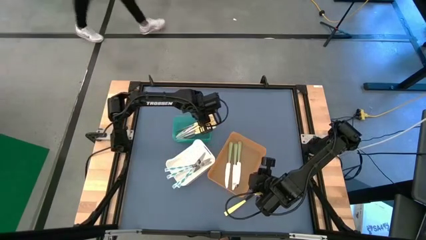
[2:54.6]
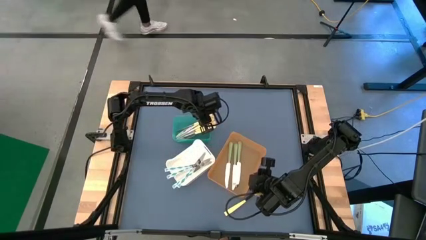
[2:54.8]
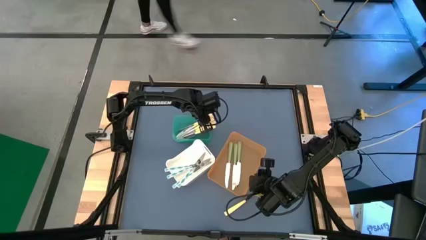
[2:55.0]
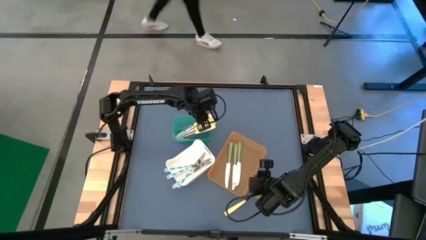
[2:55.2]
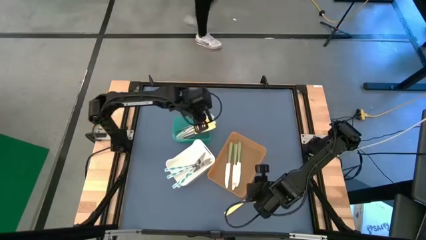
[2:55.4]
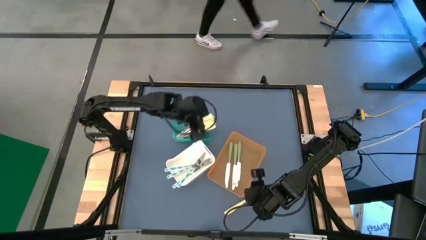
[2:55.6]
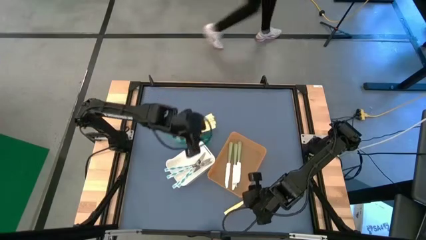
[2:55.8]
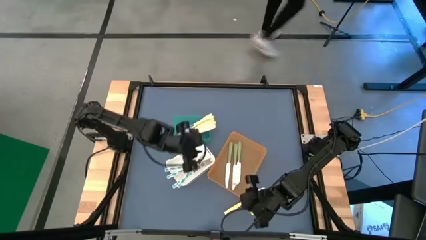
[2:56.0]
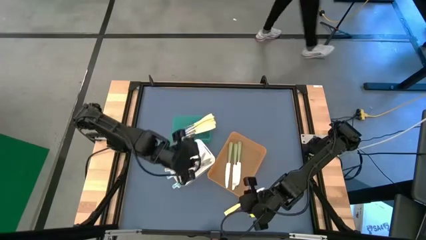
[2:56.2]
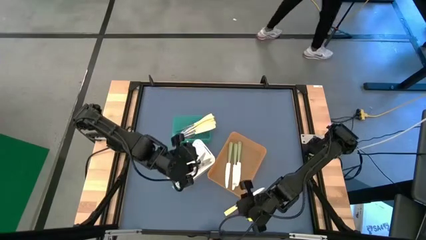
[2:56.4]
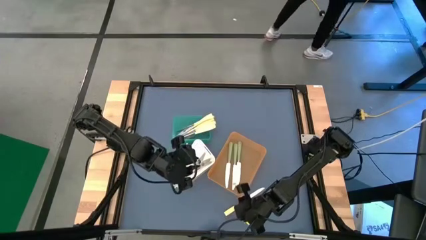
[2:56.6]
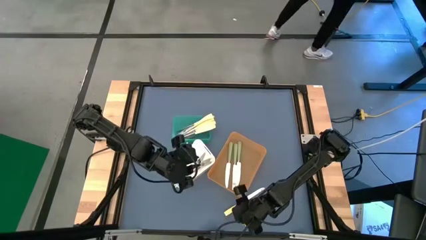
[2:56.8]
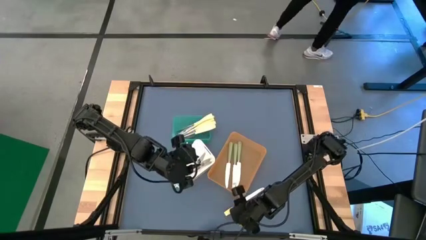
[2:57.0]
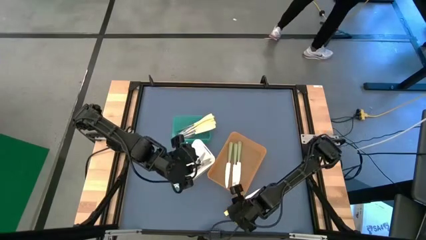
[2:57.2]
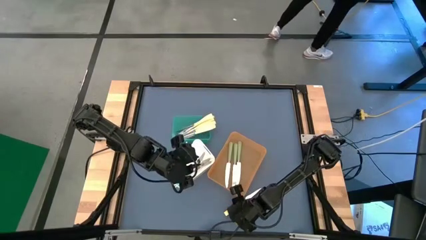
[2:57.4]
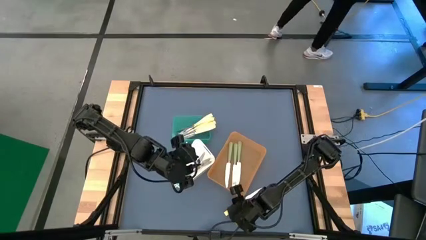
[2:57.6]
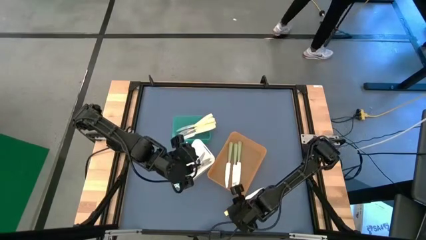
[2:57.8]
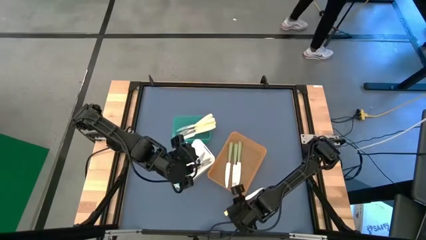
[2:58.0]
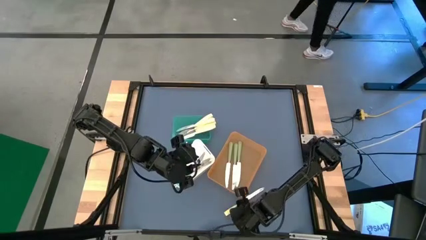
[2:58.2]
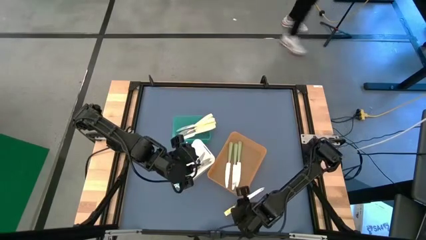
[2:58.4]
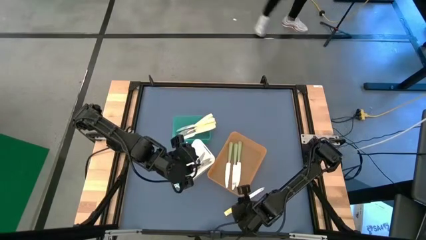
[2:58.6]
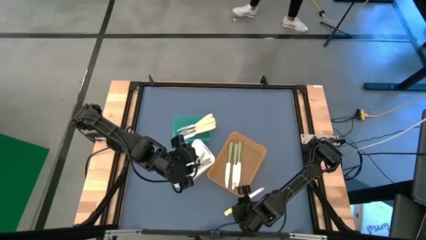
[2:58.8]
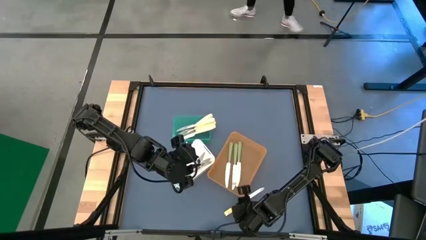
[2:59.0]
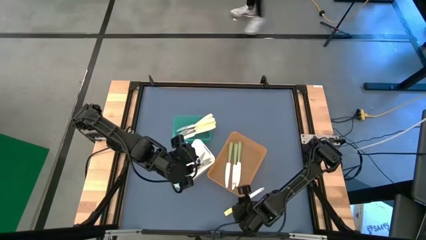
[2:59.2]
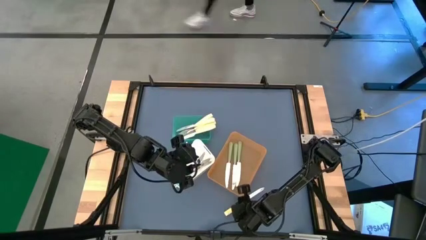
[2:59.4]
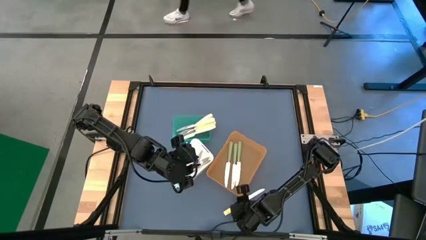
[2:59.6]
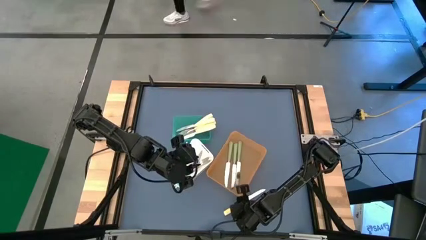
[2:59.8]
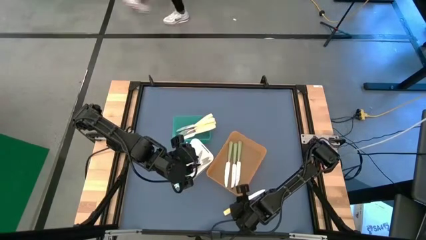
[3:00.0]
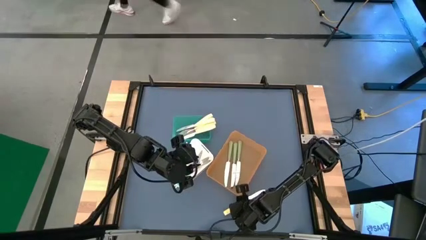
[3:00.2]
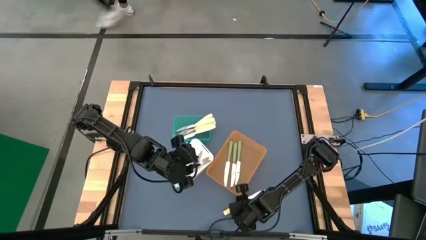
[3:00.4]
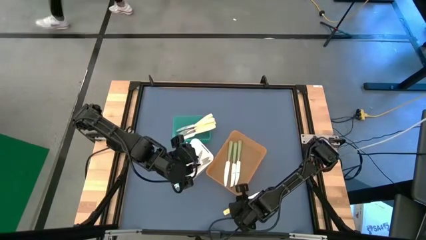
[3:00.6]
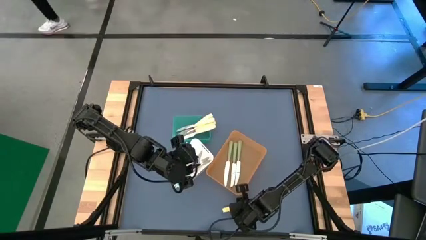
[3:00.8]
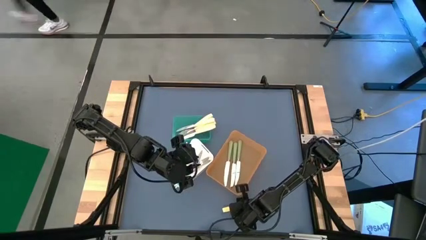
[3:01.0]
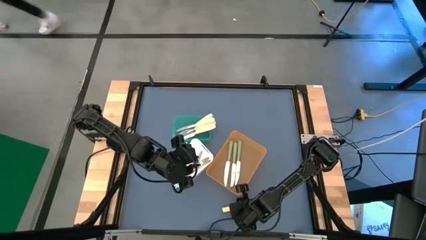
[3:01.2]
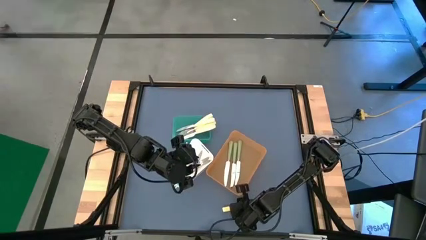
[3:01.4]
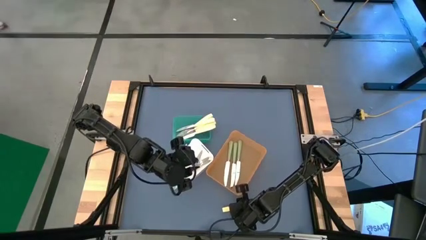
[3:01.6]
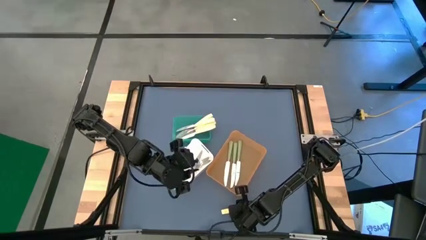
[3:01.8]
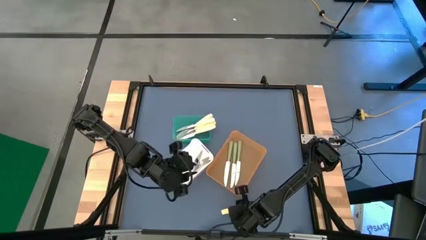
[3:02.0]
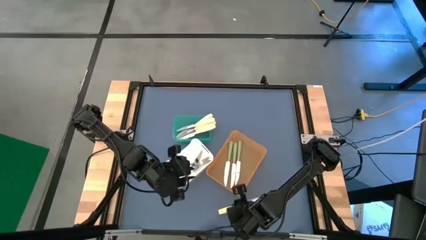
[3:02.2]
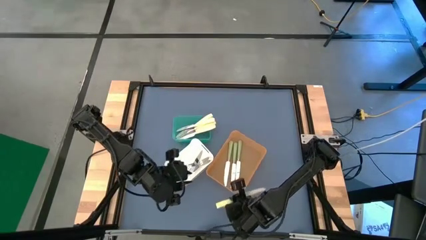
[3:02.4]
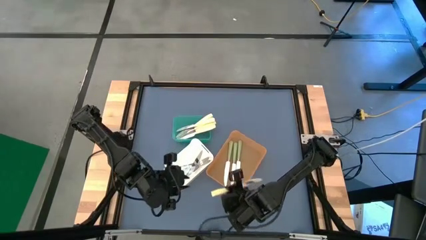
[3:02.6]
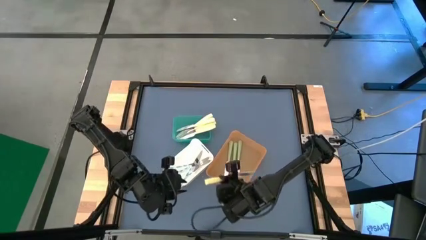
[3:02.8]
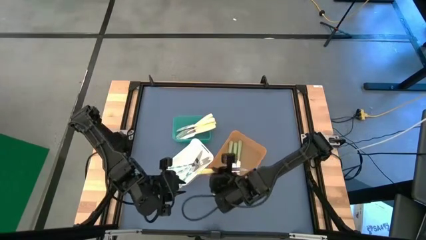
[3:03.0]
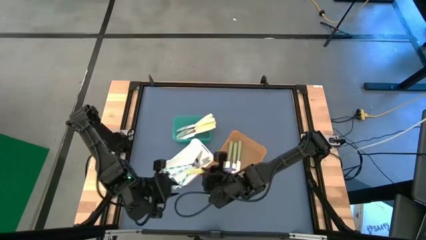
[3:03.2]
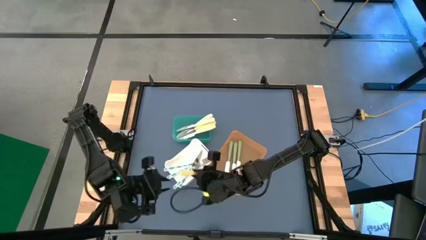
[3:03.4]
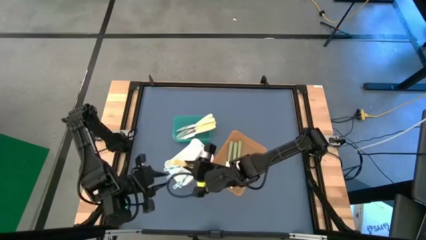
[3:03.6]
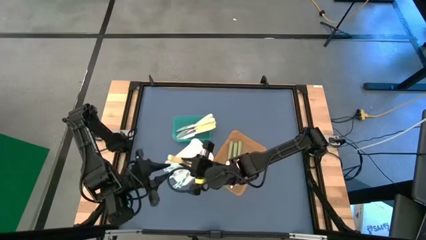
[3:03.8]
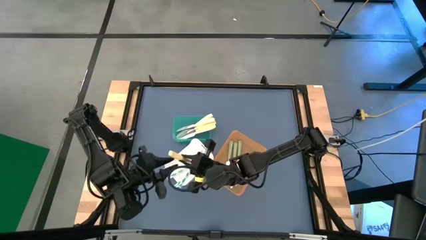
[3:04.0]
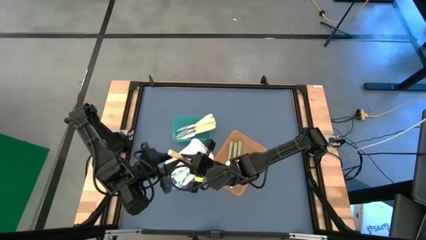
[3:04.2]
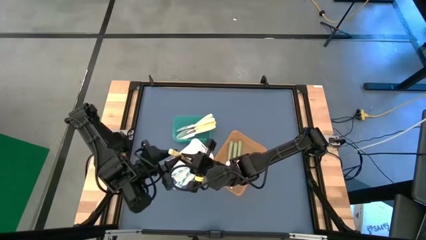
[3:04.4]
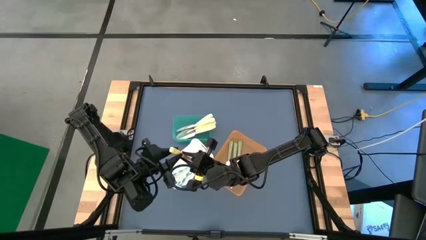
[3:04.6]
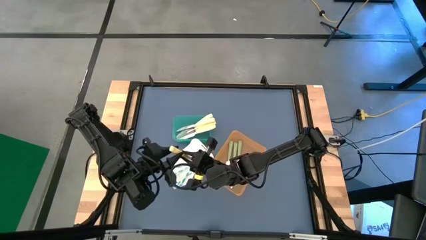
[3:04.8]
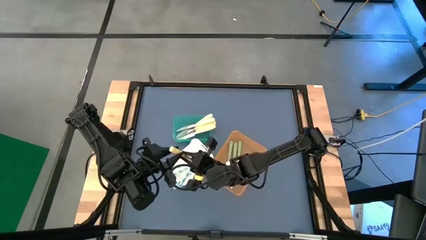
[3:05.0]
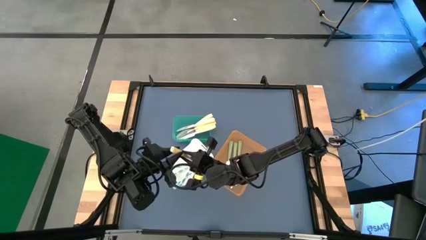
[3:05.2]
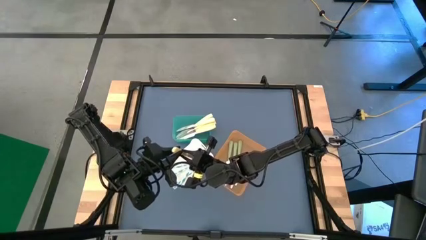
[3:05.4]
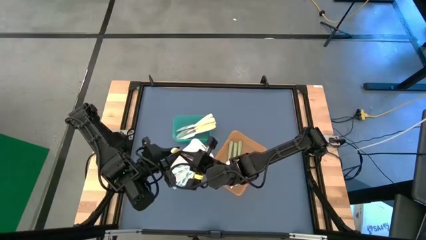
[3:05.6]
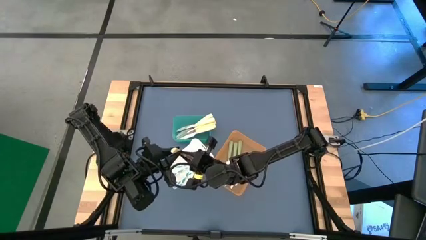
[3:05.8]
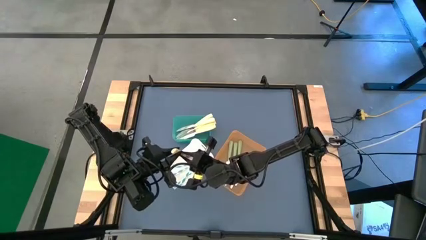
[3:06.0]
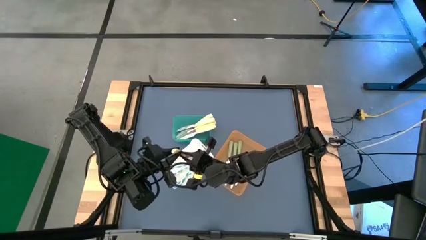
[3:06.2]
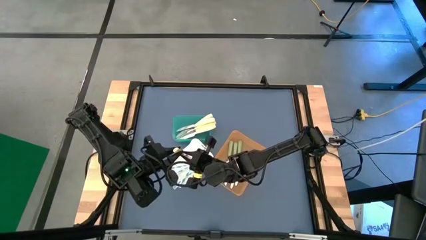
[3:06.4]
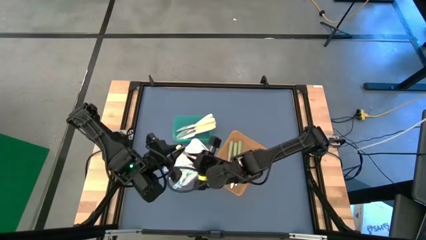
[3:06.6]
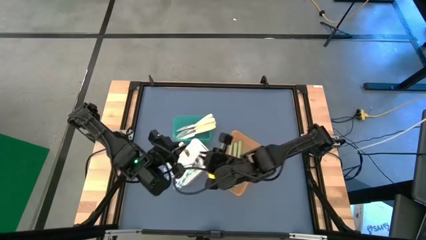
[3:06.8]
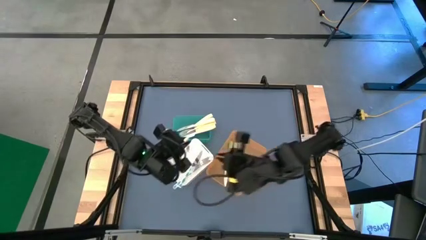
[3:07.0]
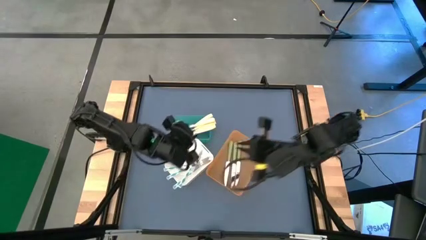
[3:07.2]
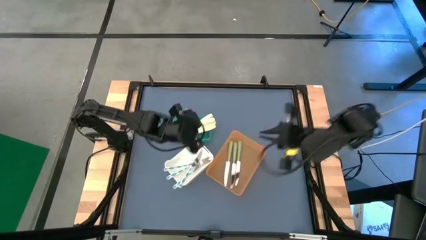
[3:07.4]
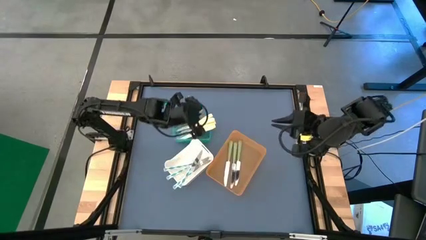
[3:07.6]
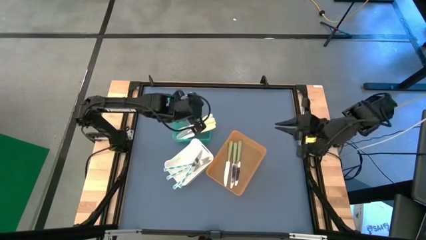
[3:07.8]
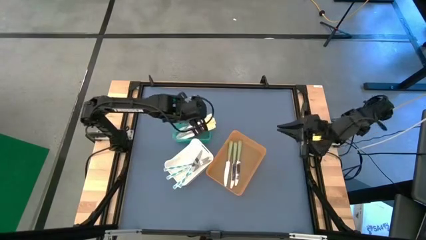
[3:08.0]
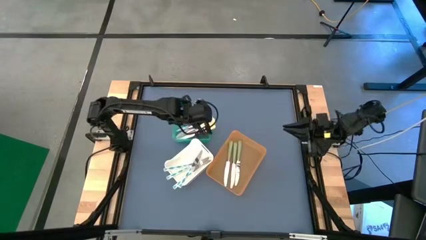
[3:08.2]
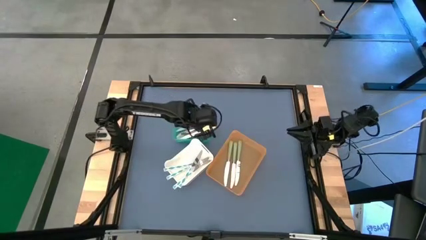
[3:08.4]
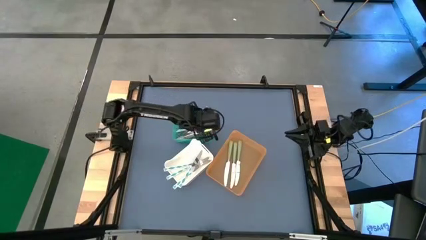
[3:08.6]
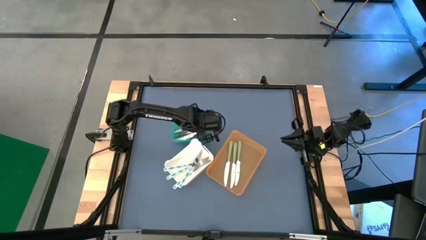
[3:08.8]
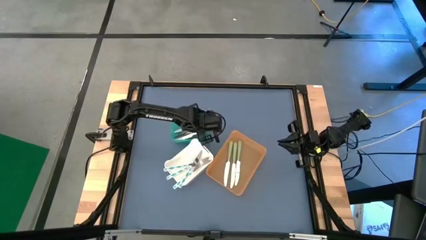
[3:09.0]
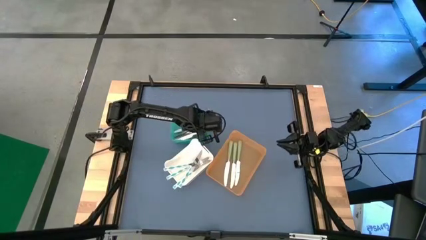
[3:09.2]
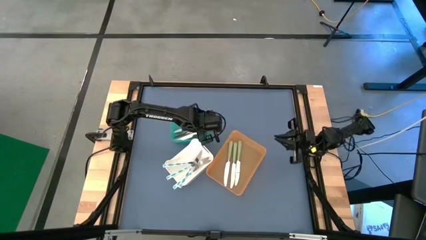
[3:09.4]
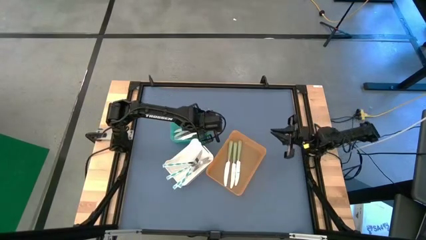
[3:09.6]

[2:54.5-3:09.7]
Task: Sort silverware by color (type)
Put the yellow knife into the blue bin
